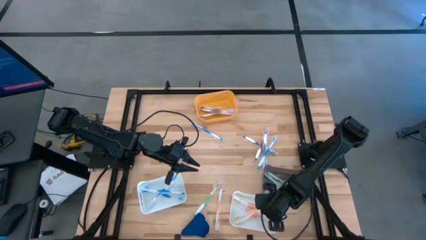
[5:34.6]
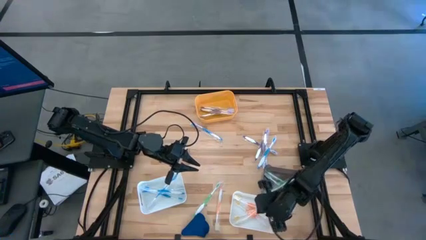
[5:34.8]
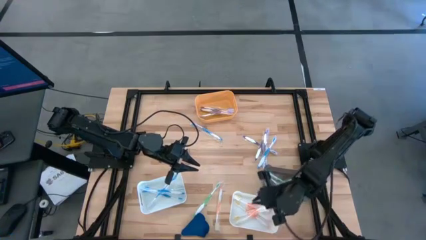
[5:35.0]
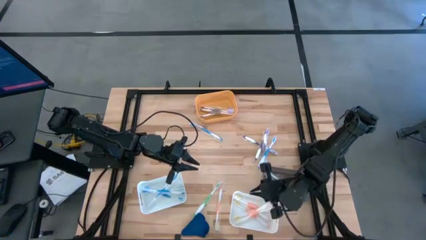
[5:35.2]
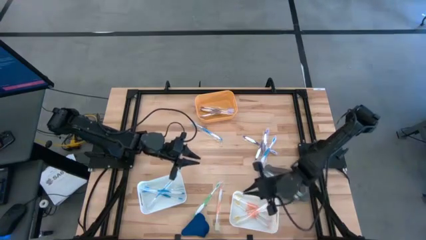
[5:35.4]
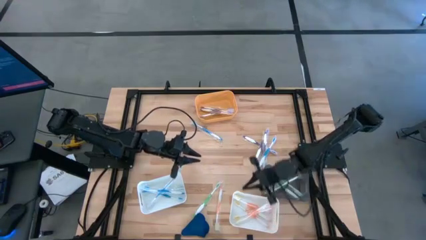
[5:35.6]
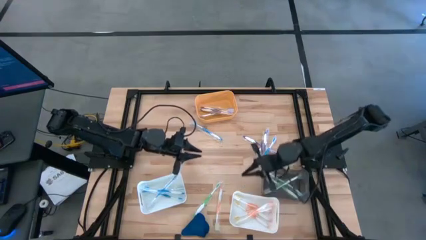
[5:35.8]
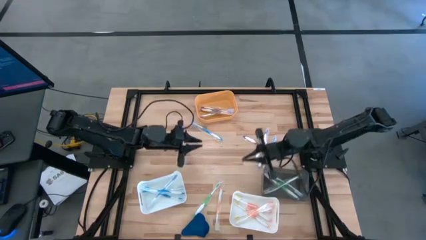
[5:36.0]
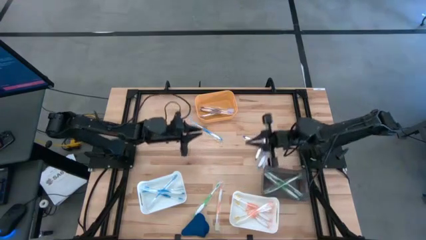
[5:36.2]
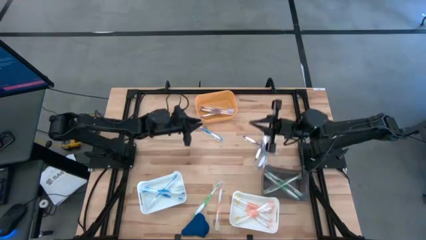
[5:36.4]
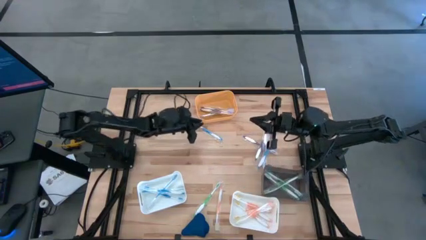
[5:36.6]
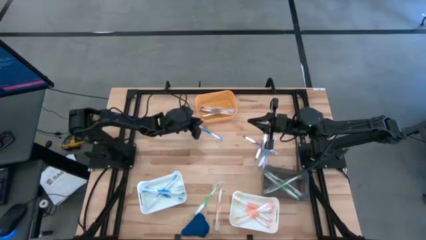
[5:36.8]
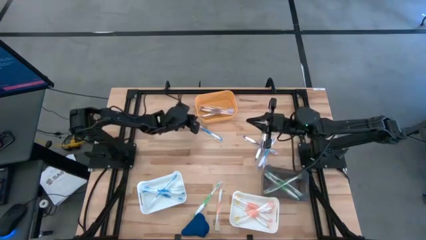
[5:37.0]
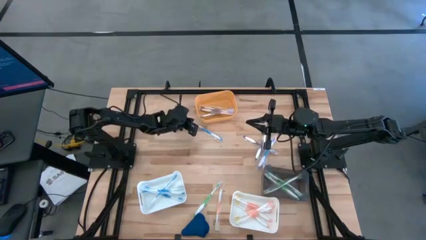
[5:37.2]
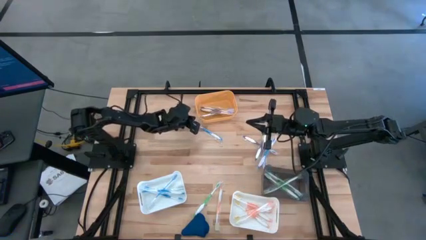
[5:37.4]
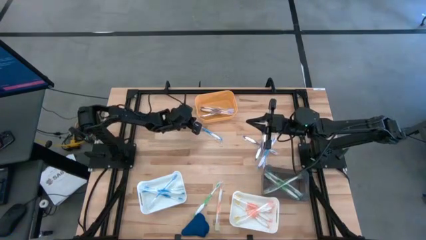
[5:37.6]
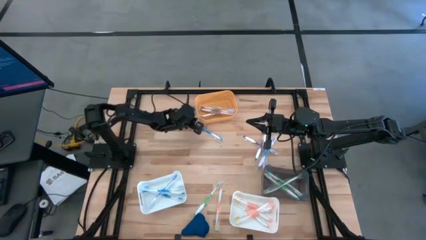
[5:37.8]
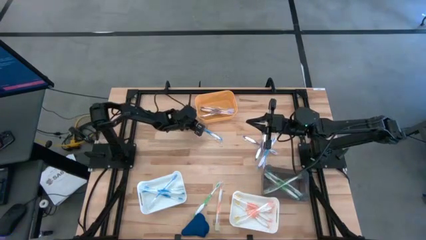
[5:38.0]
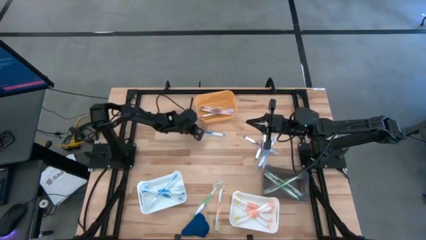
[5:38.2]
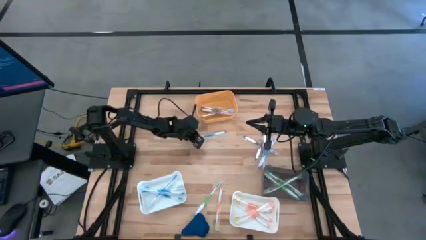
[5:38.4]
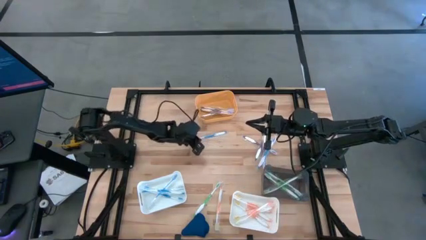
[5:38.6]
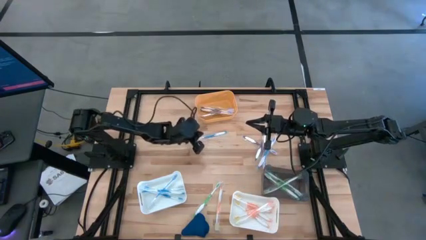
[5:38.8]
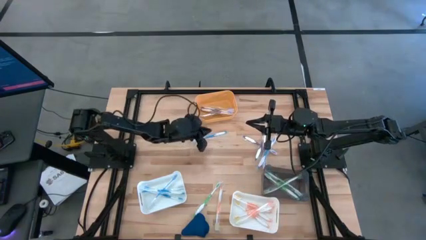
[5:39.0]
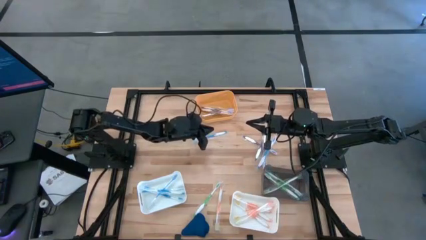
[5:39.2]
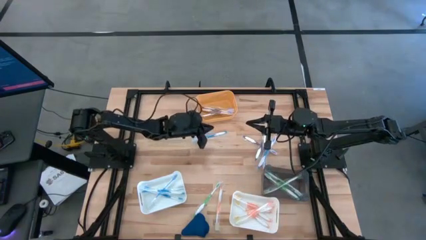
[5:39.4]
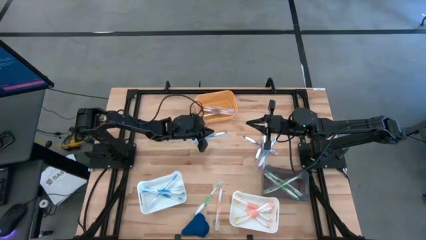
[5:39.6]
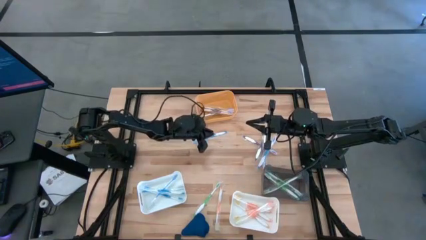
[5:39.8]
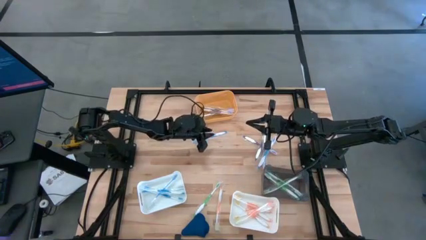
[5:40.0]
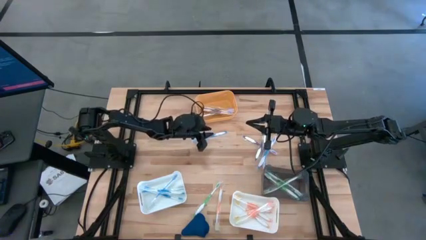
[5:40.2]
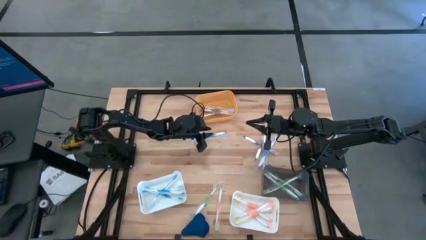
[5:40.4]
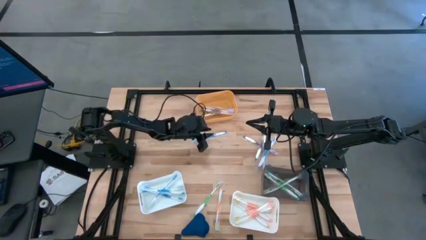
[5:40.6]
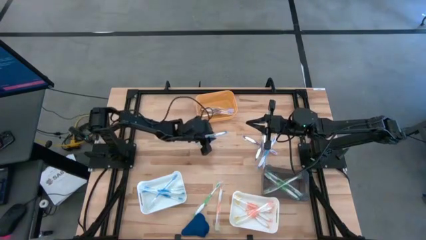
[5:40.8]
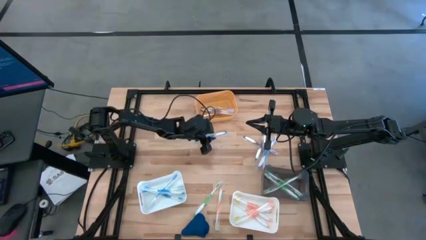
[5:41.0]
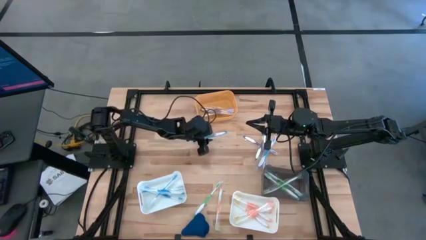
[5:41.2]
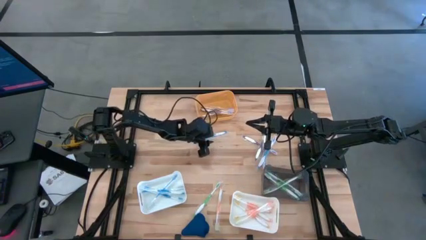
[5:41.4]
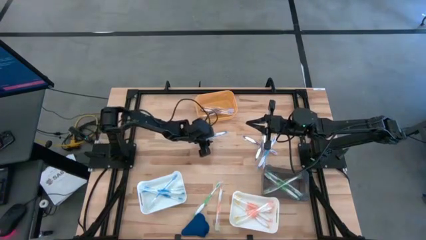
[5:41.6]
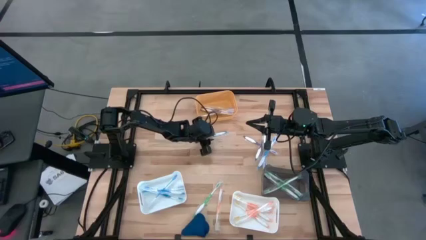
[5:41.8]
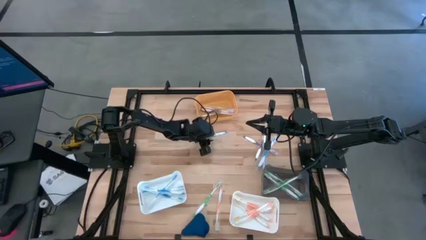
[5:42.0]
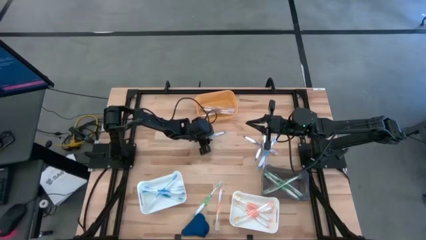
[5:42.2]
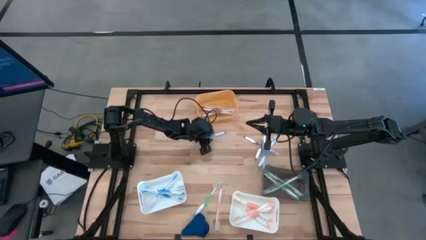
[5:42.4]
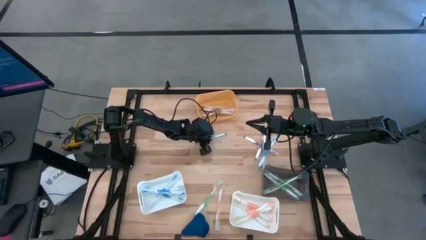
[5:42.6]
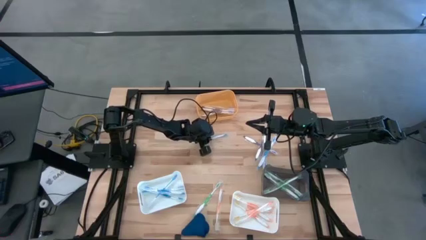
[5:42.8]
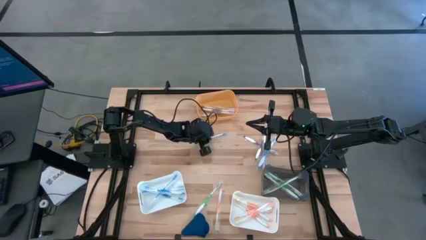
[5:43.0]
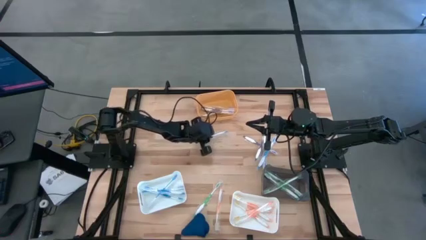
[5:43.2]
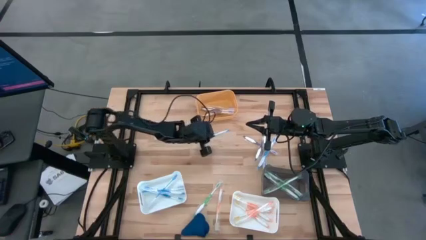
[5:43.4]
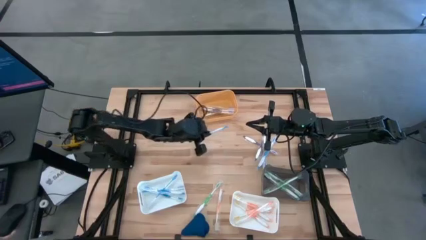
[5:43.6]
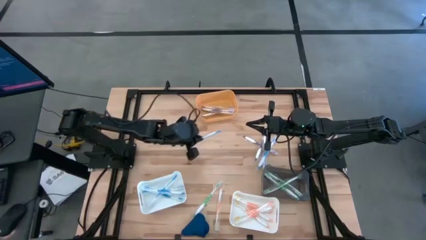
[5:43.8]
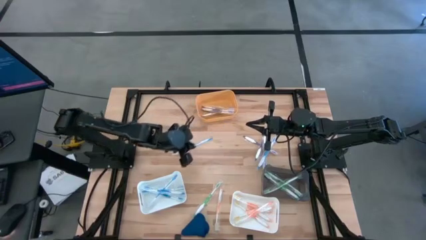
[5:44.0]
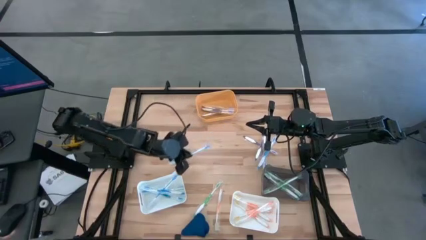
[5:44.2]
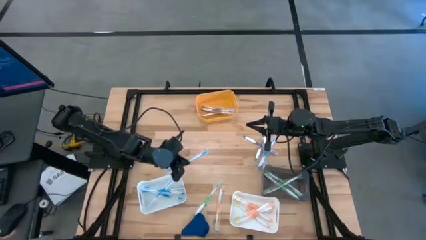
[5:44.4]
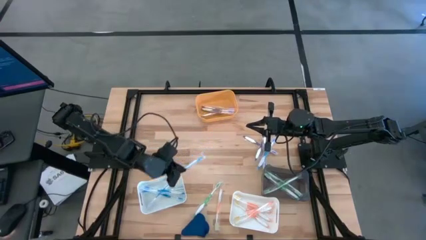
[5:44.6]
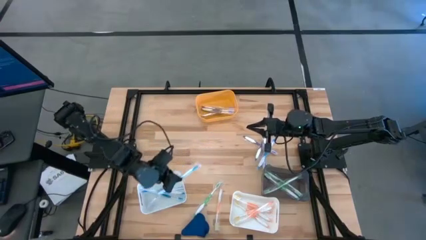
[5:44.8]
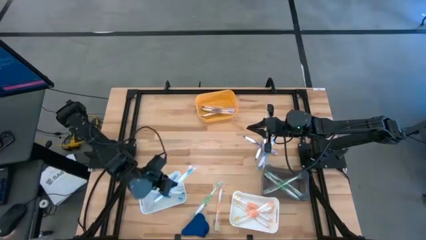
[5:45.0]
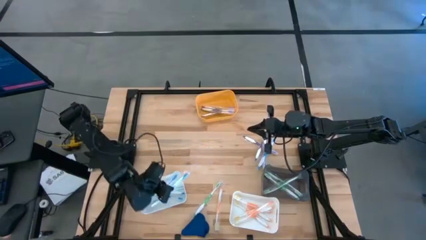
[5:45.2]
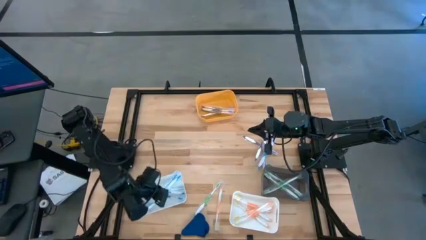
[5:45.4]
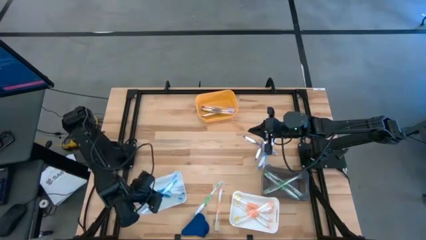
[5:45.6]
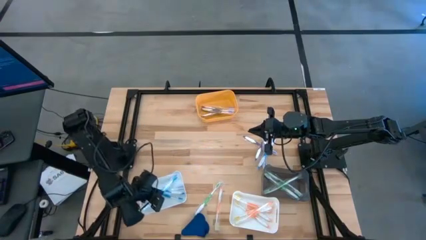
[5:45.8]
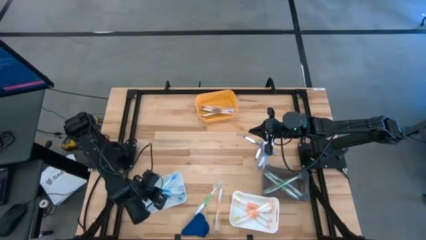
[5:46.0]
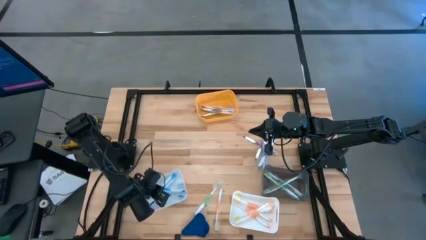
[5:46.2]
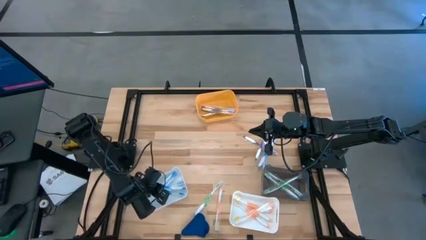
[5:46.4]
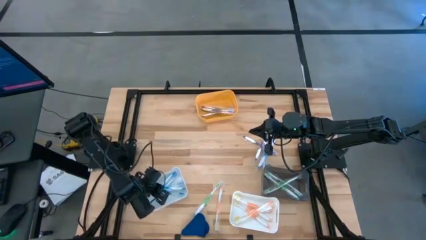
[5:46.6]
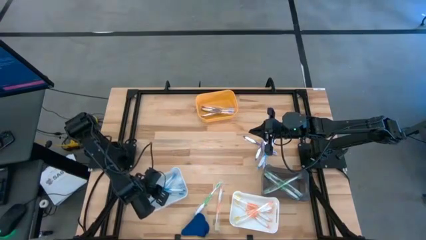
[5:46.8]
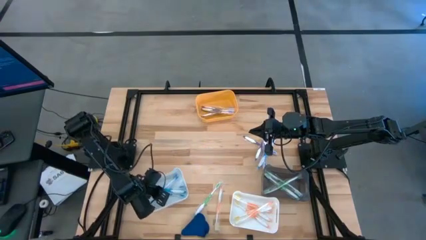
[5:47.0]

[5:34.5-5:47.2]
Task: Pick & Place Toothbrushes
Put the blue toothbrush into left white bin

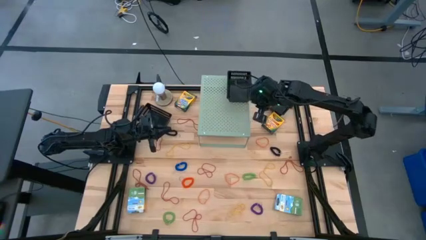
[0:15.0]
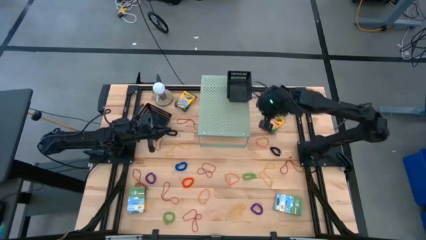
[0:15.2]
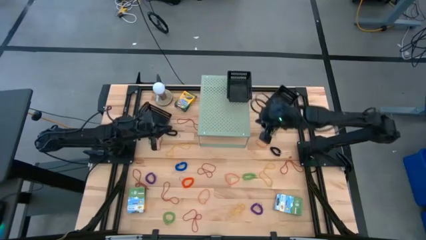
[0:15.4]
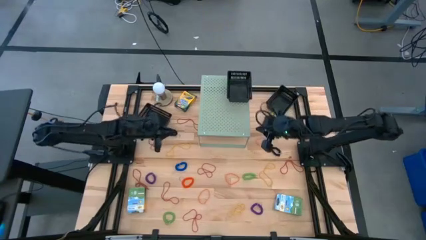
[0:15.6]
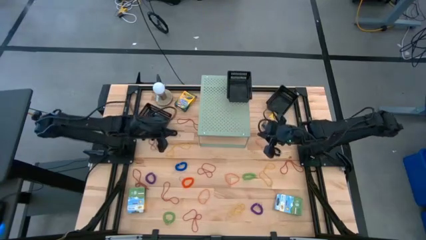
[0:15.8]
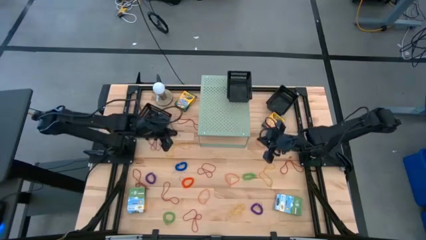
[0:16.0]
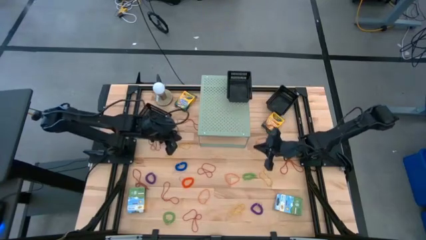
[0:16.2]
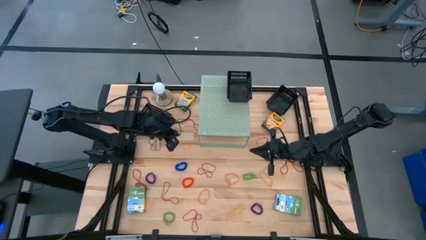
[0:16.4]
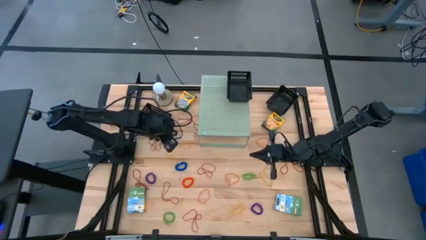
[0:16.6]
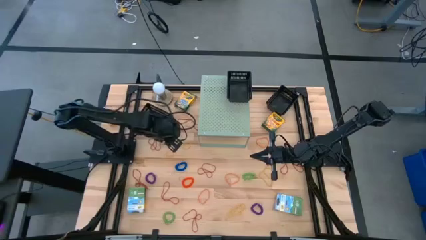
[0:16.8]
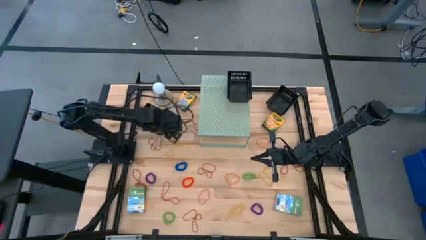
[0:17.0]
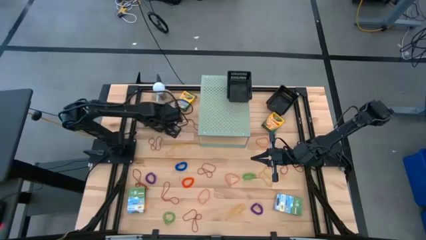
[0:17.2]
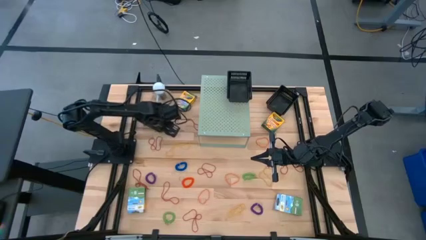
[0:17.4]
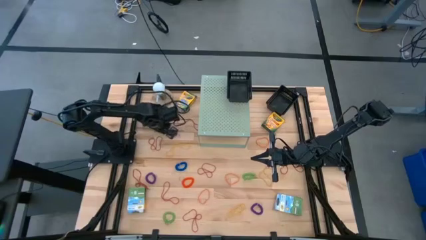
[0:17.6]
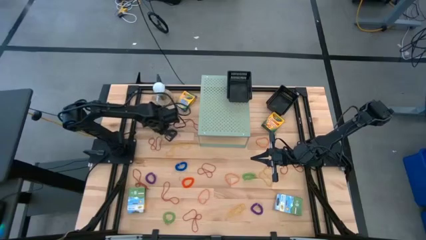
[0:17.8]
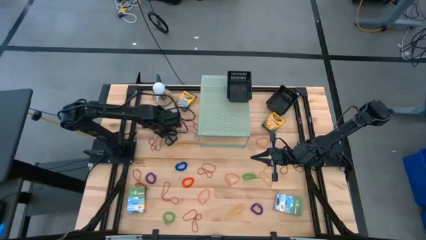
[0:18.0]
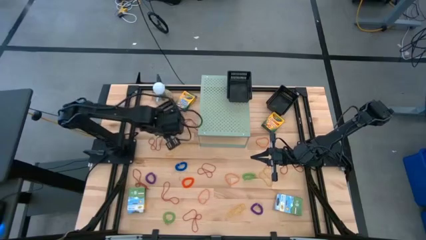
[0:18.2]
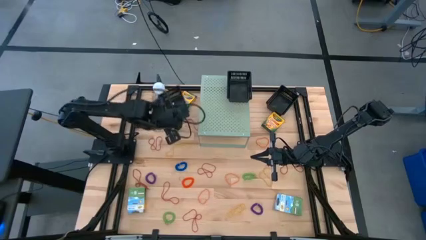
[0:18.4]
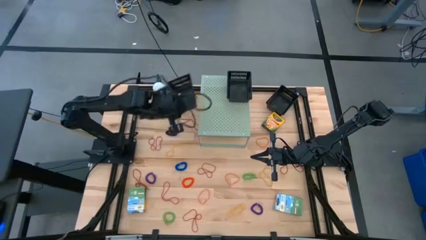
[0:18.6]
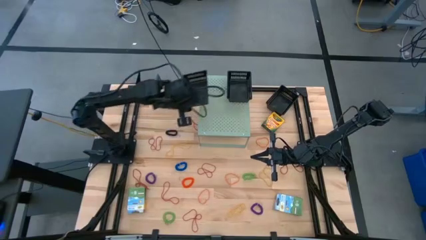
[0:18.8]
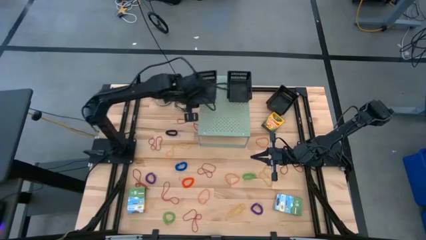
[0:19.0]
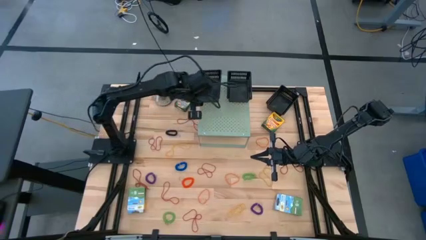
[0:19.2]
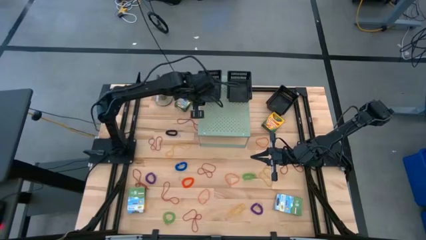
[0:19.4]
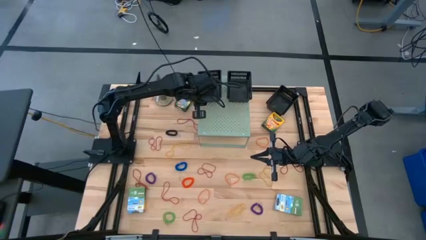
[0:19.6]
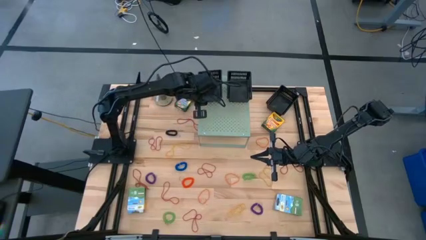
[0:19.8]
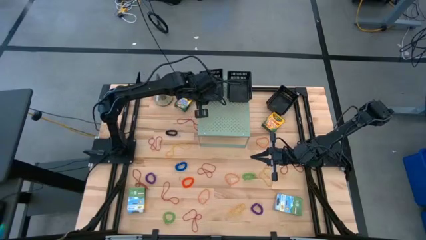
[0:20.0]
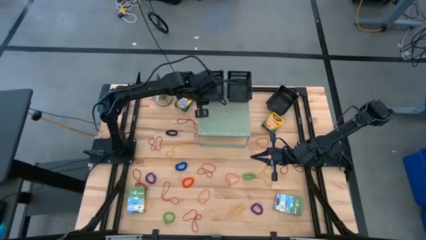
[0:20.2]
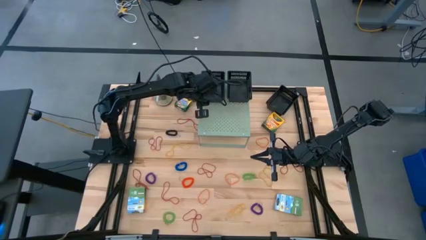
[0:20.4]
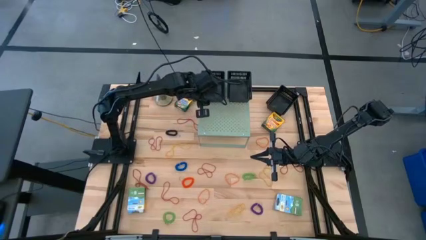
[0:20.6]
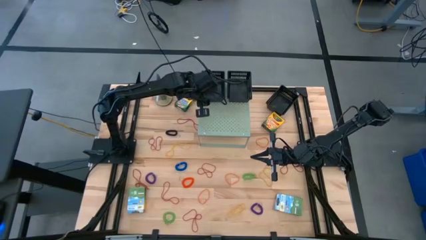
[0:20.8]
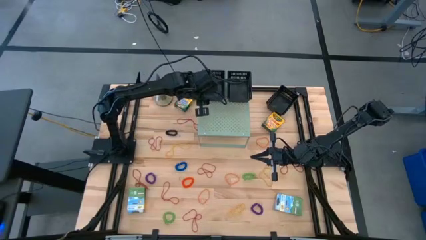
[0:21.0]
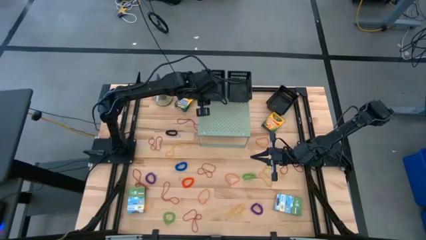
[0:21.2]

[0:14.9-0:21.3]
Task: Pick & Place Office Desk Supplies
Put the left black bin on the shelf
